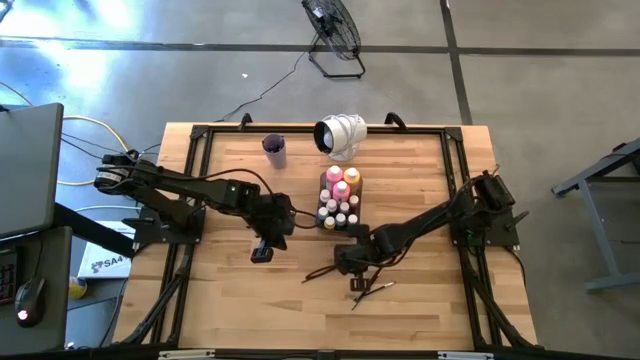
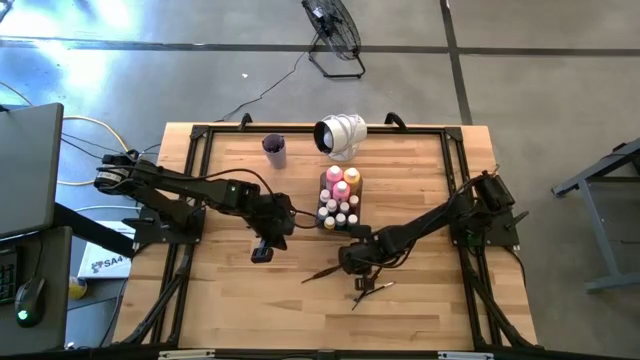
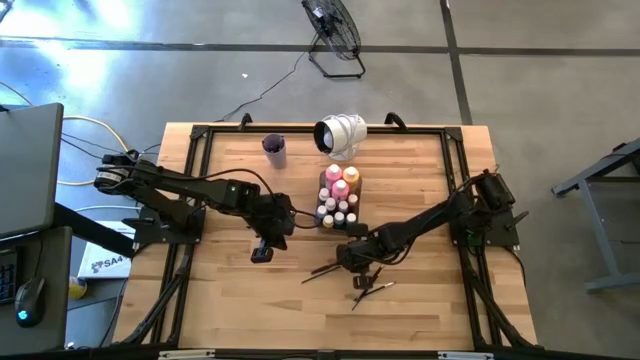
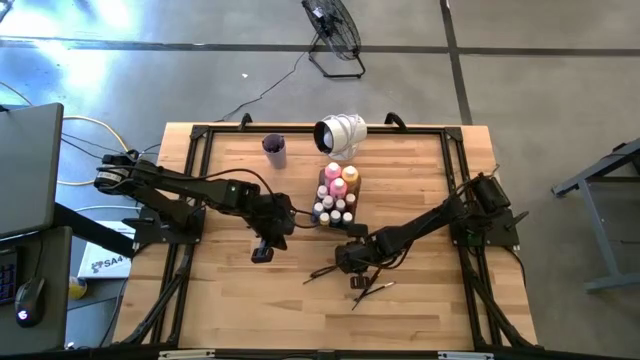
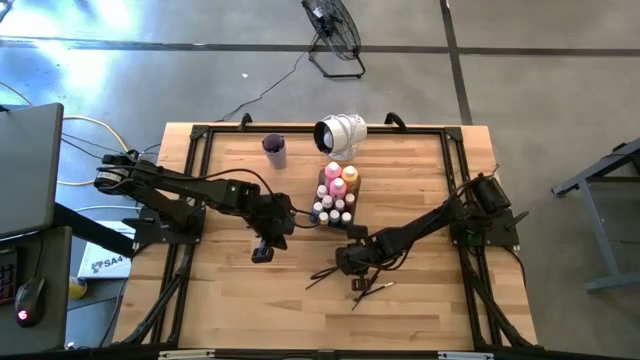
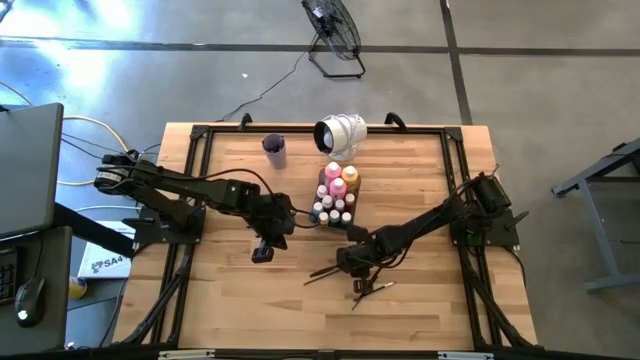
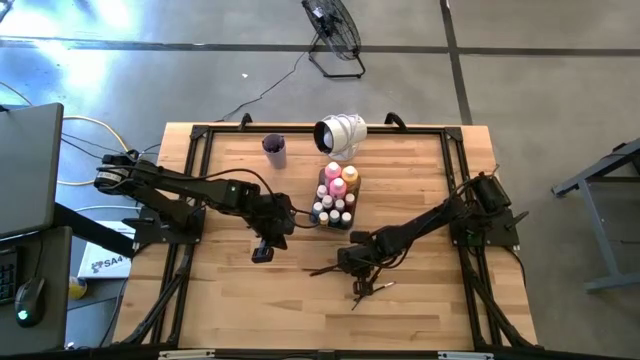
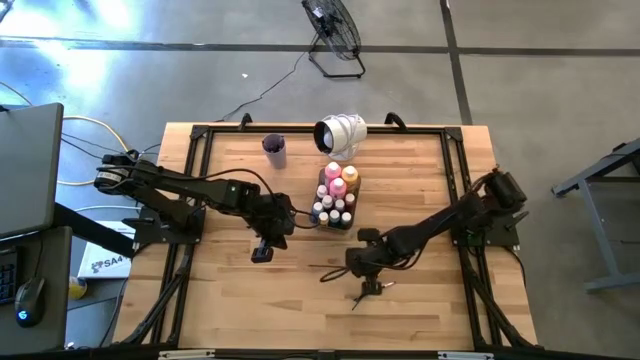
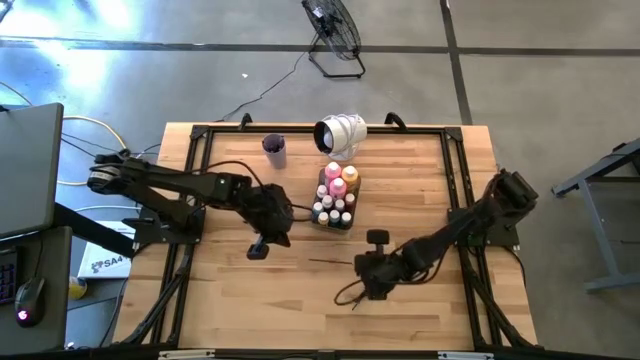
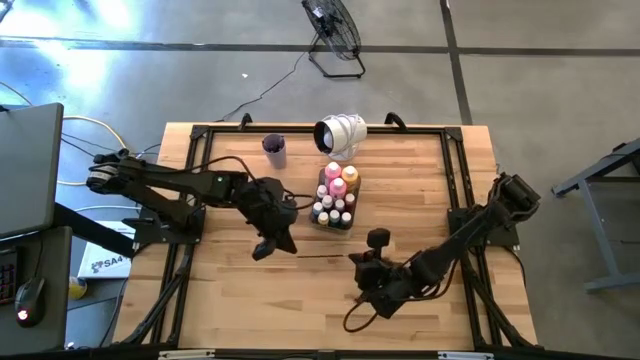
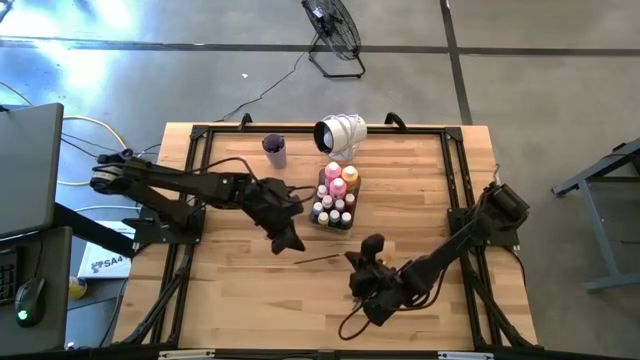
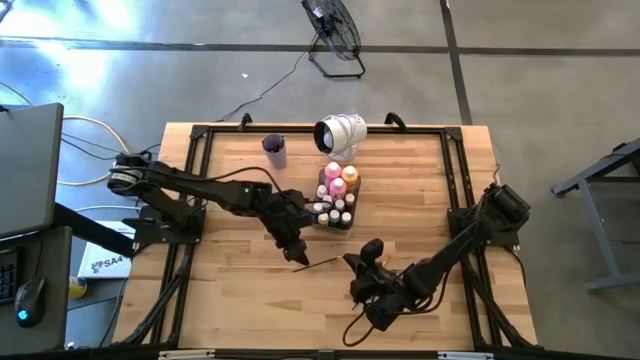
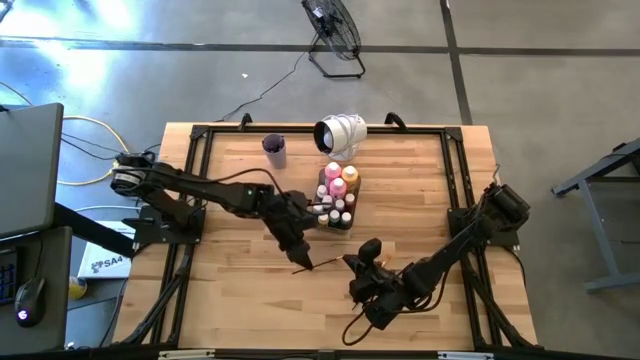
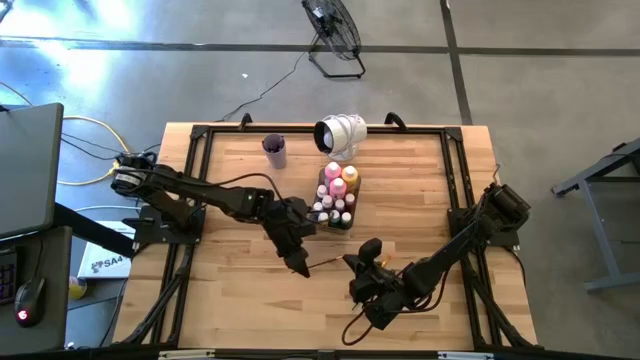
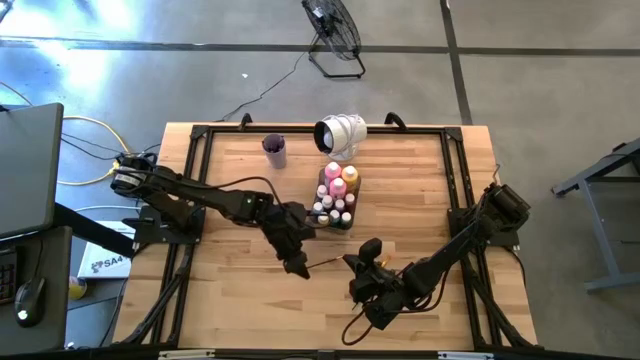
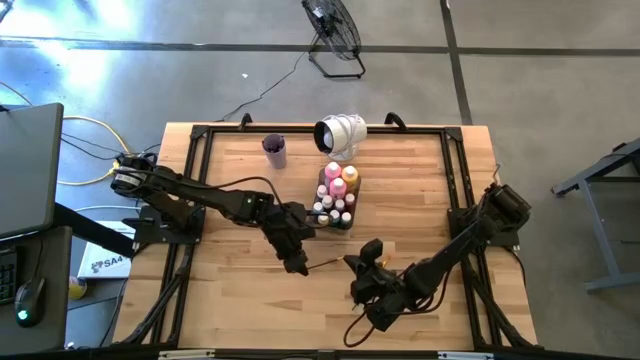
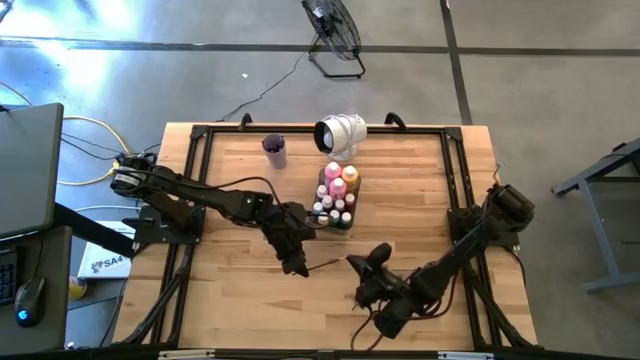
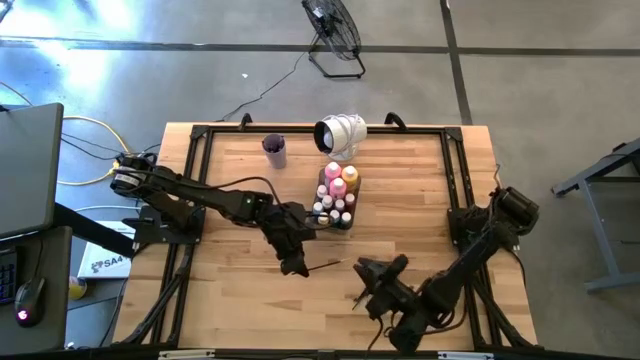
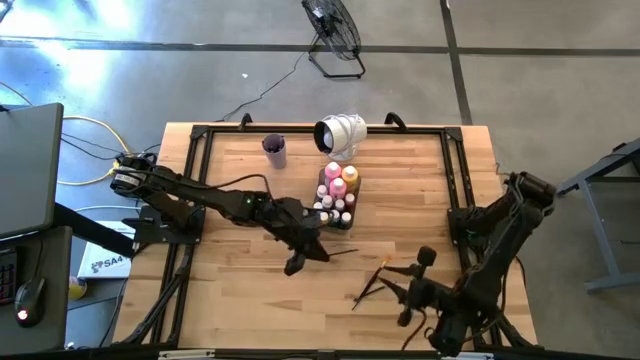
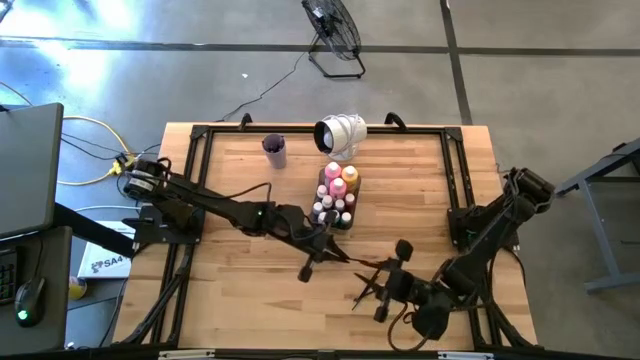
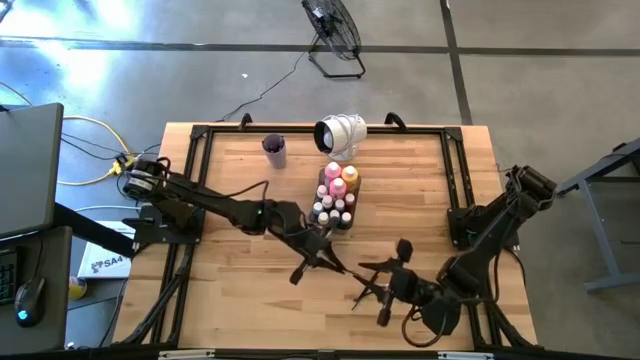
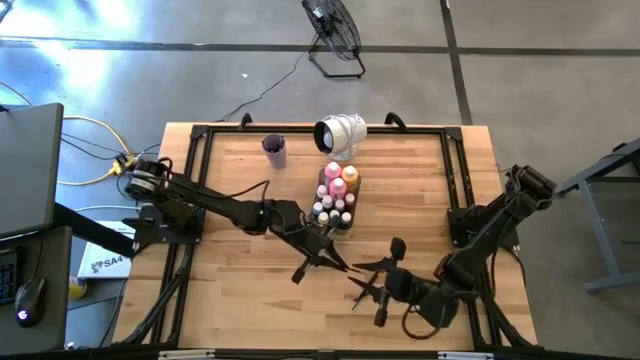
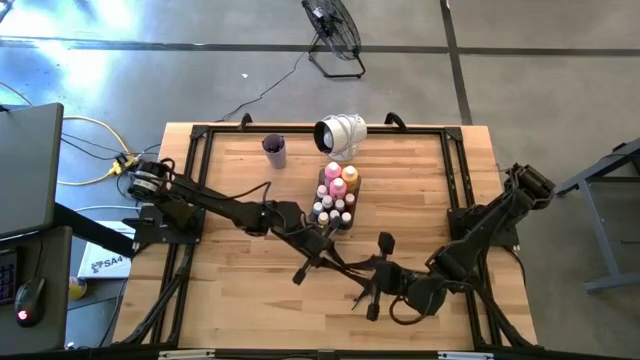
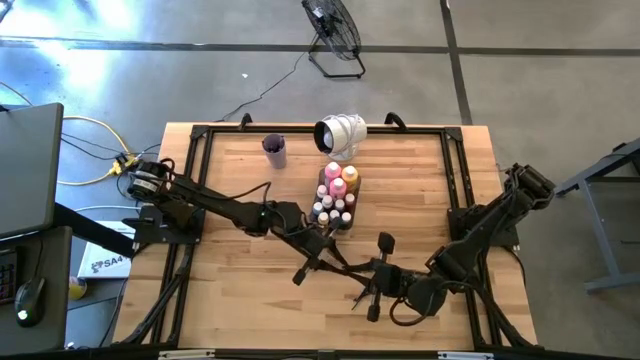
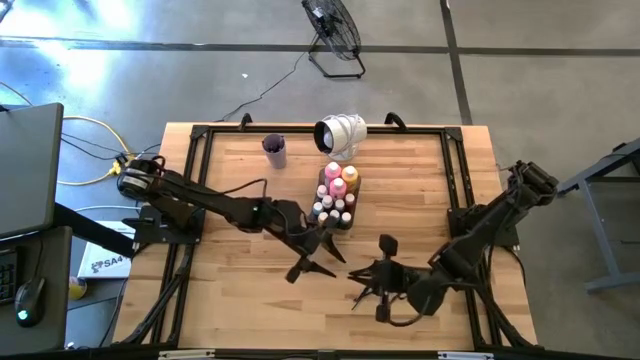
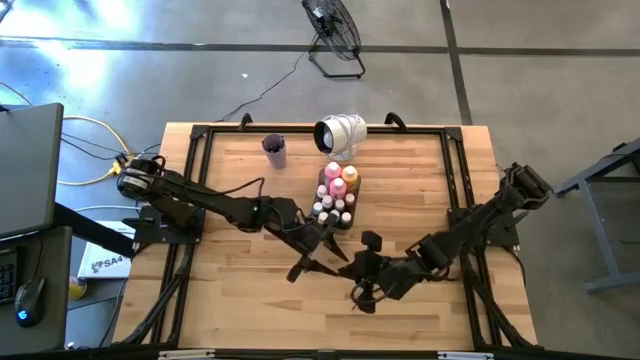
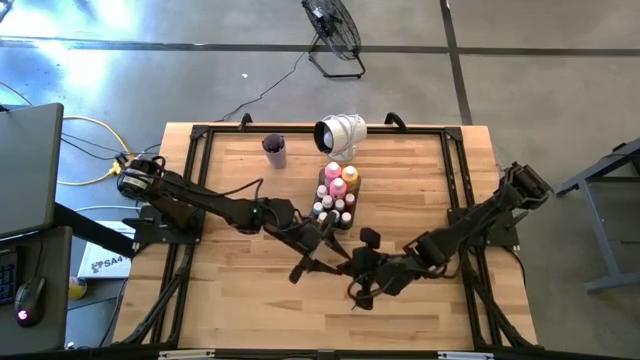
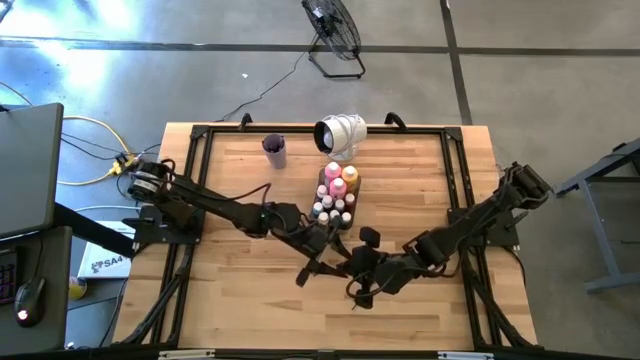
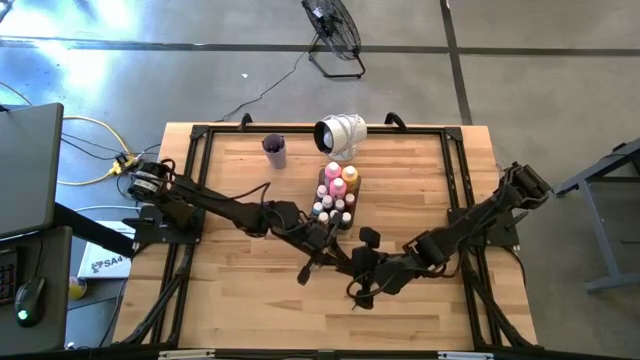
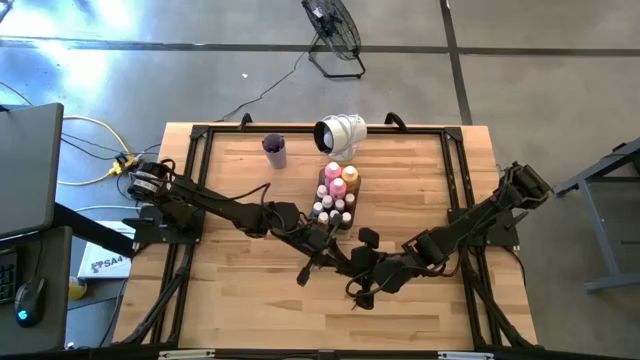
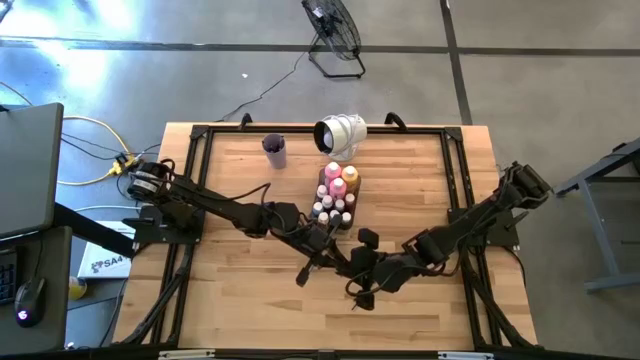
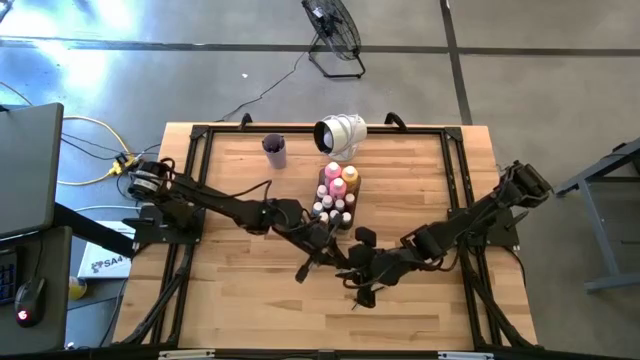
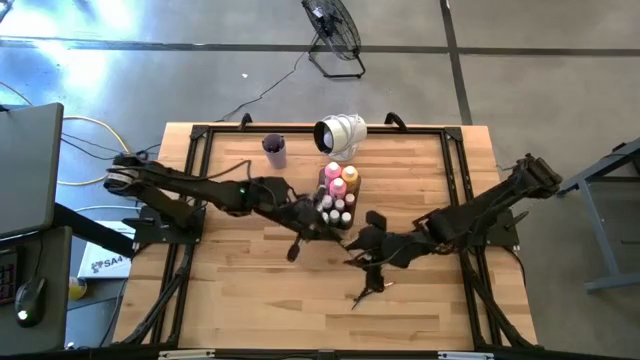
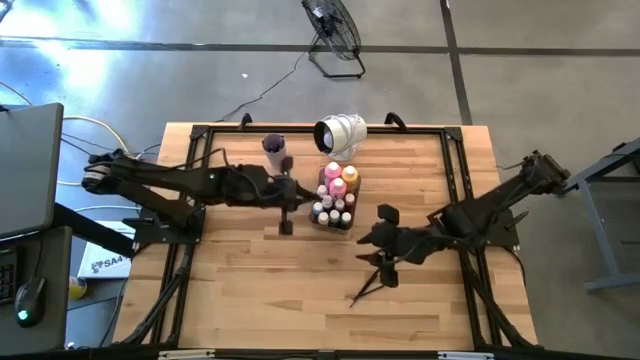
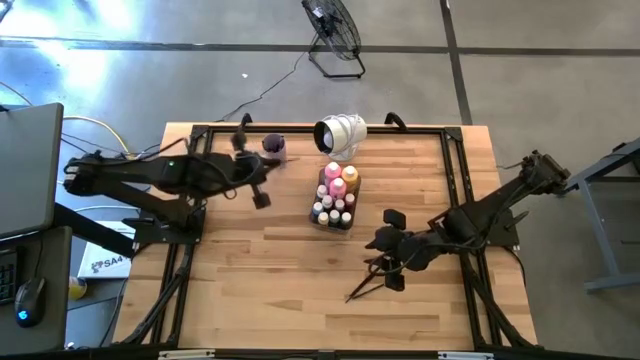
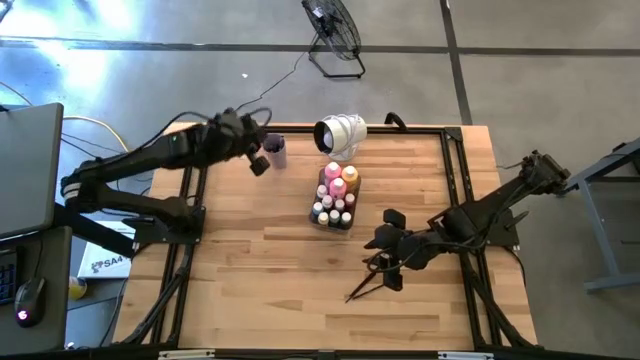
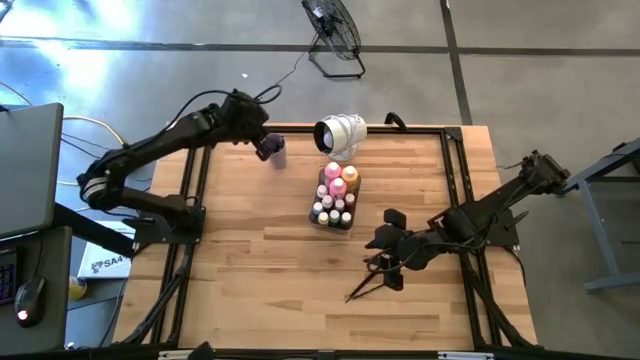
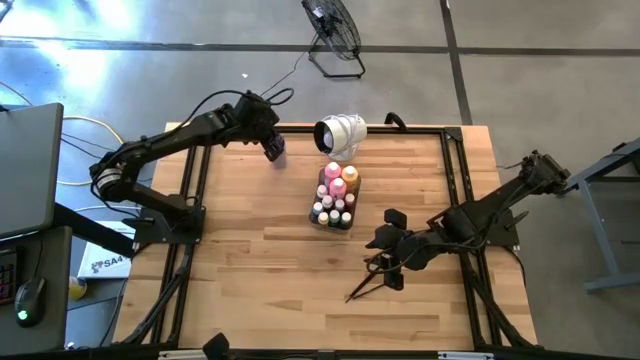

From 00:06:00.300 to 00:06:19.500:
Task: Pick & Place Paint Supplies
Put the gold paint brush into the violet cup

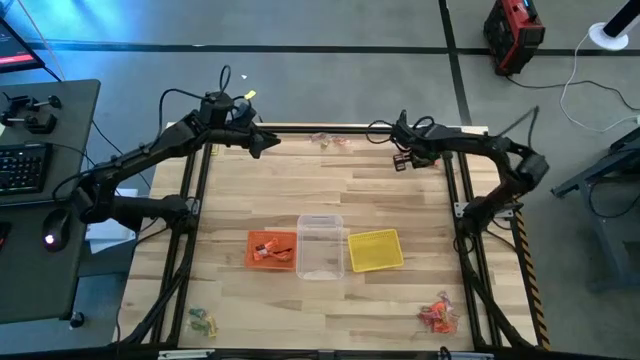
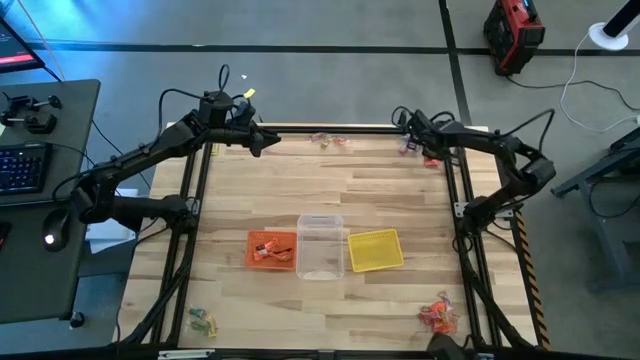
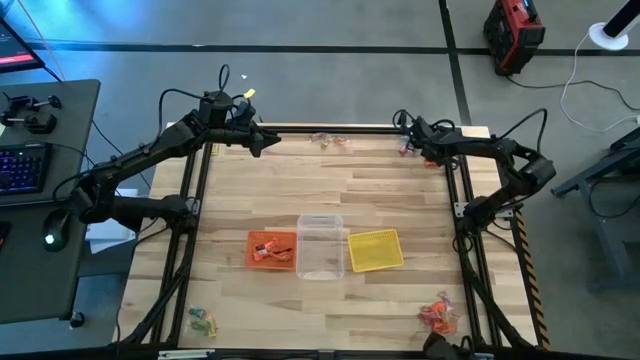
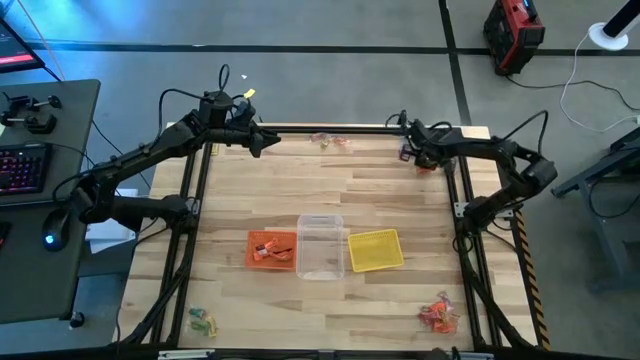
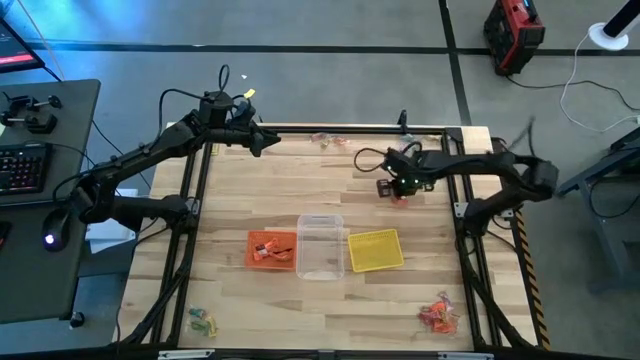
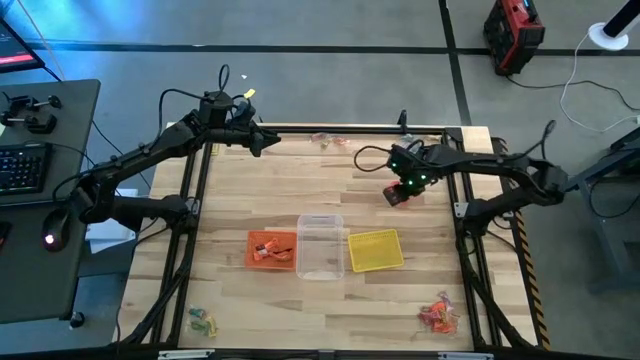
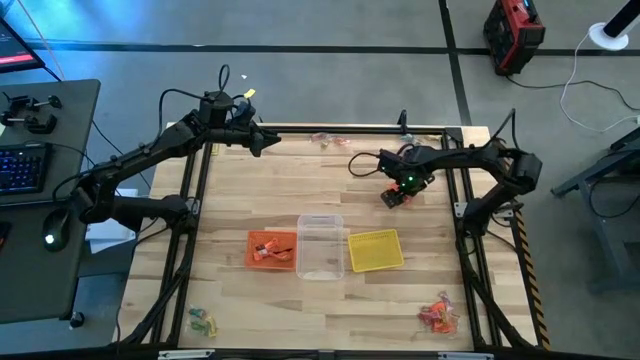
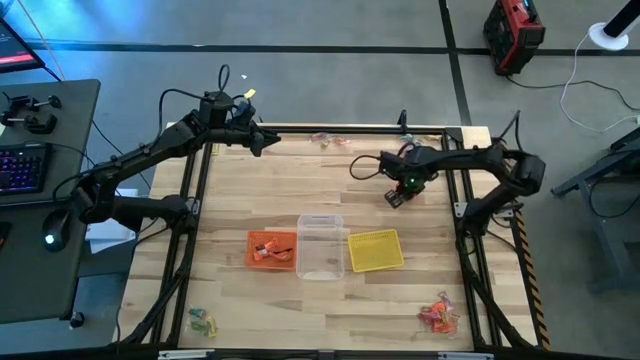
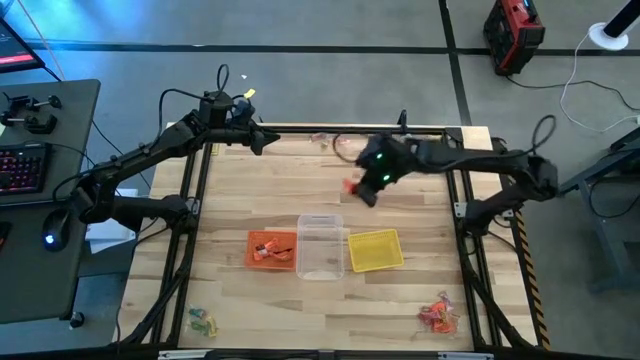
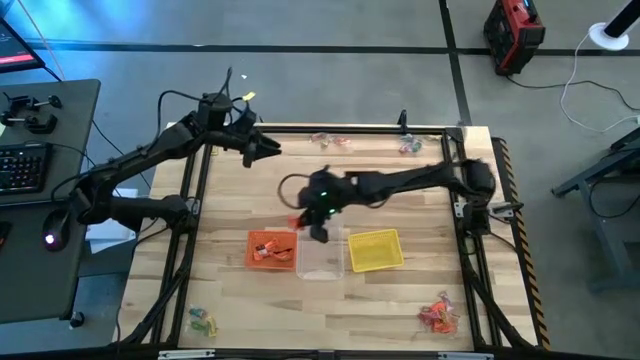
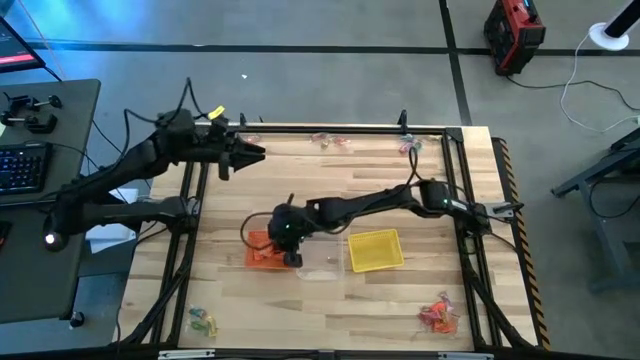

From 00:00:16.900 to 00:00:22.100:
Task: Sort candy by brand, put in halloween buckets
Put the orange chocolate bar into the orange bin
